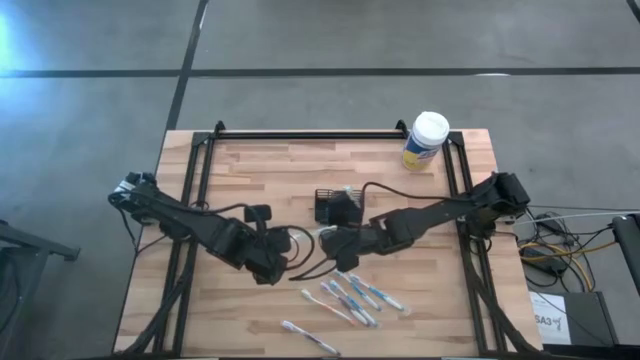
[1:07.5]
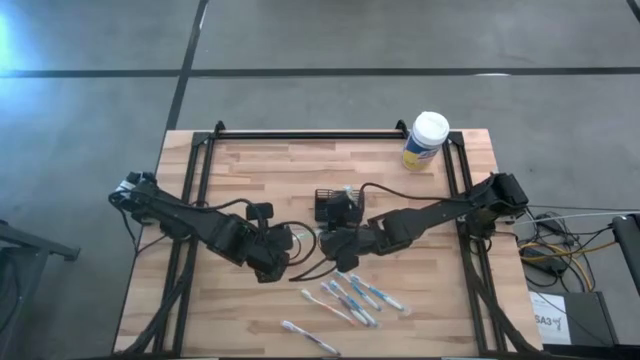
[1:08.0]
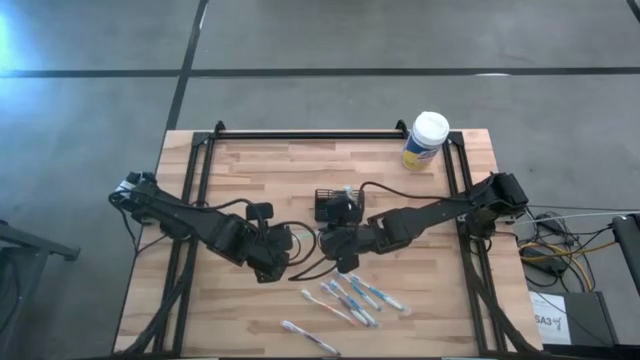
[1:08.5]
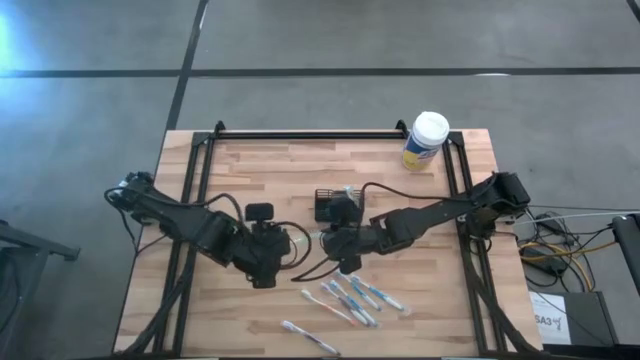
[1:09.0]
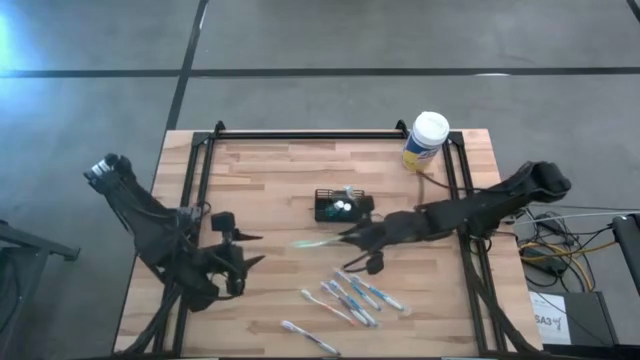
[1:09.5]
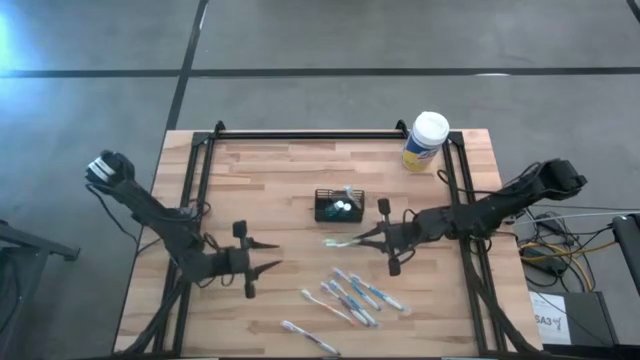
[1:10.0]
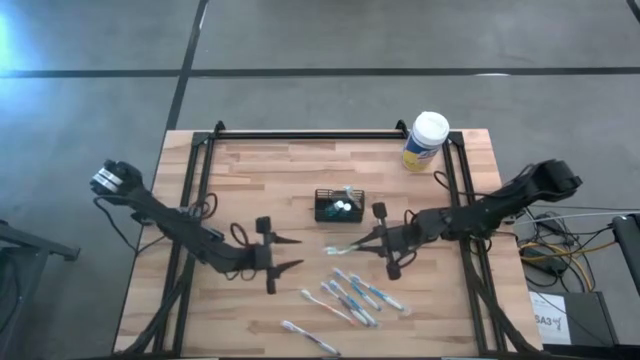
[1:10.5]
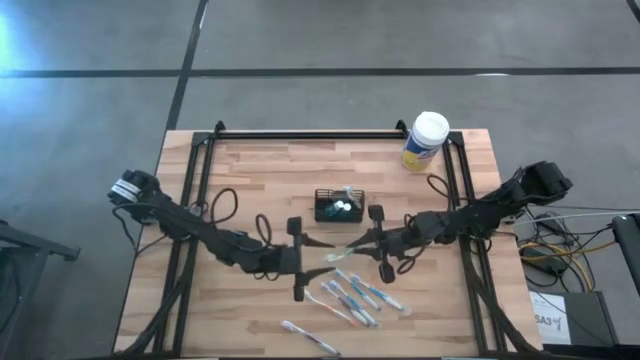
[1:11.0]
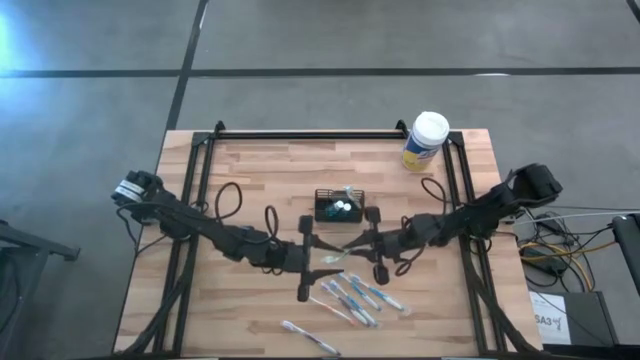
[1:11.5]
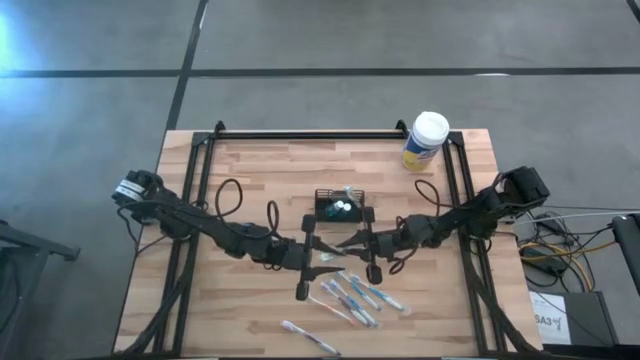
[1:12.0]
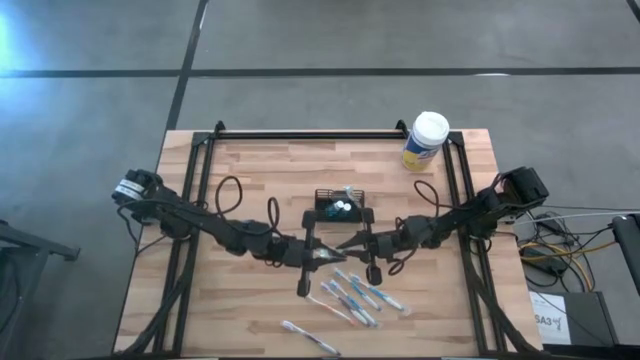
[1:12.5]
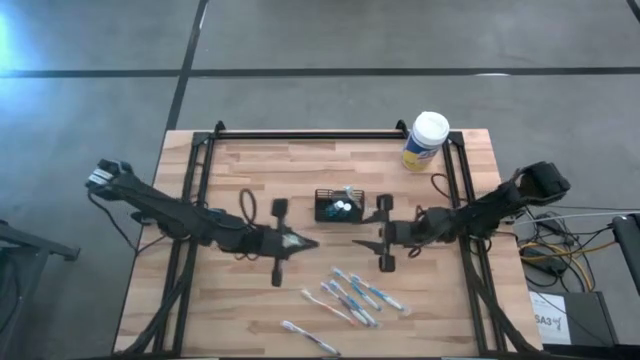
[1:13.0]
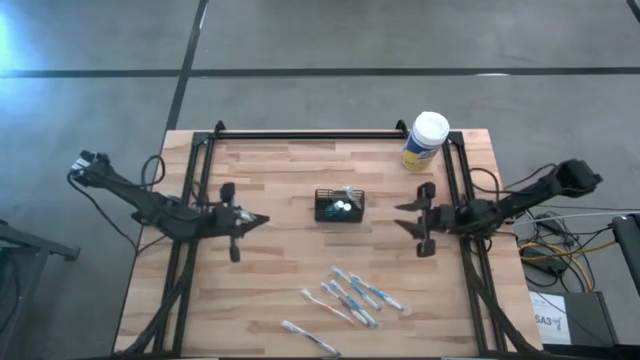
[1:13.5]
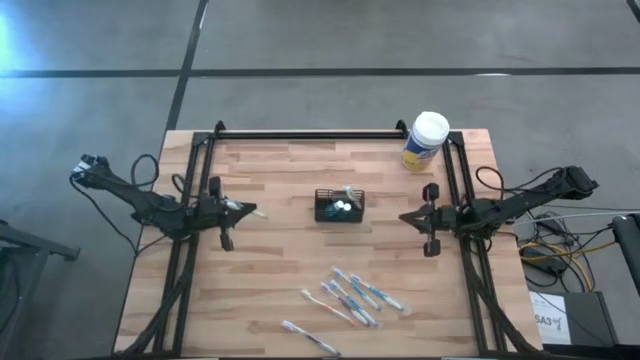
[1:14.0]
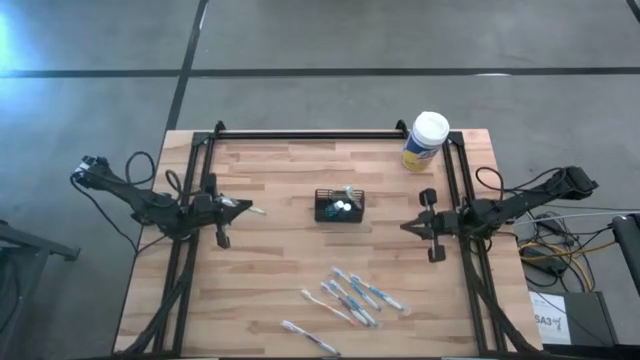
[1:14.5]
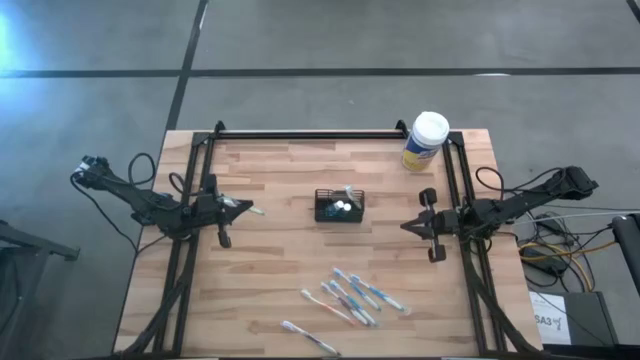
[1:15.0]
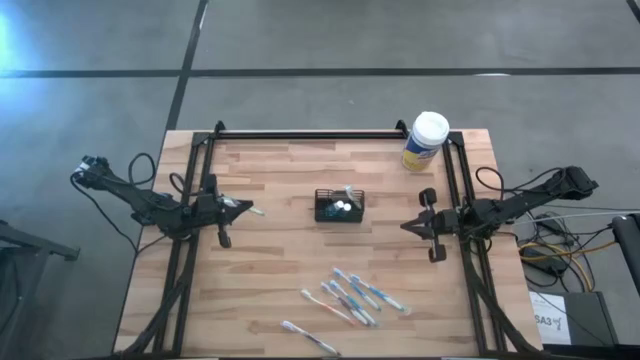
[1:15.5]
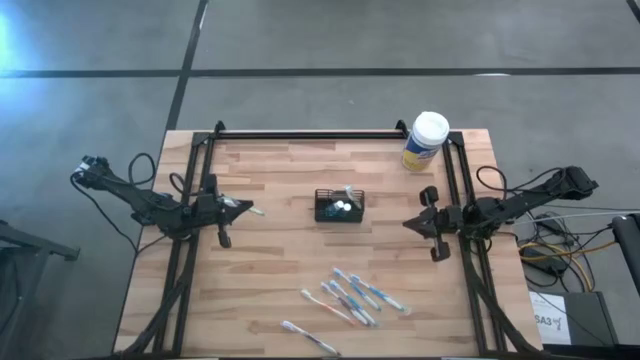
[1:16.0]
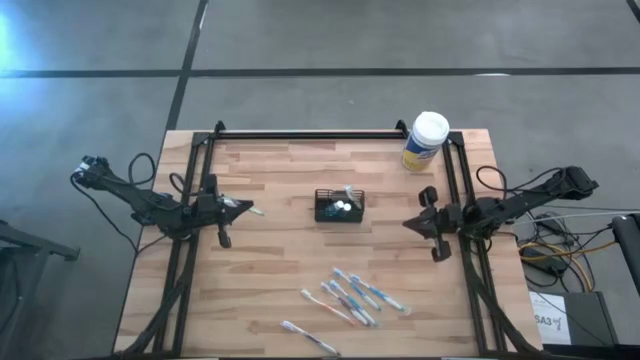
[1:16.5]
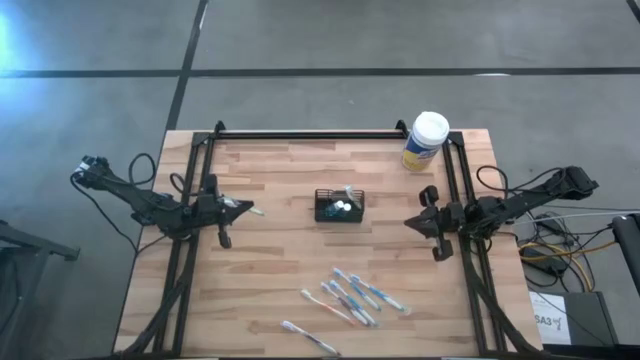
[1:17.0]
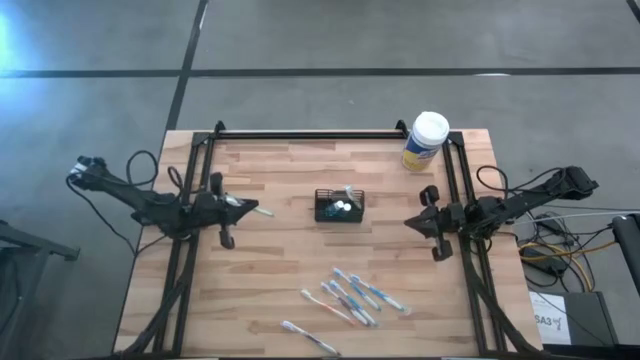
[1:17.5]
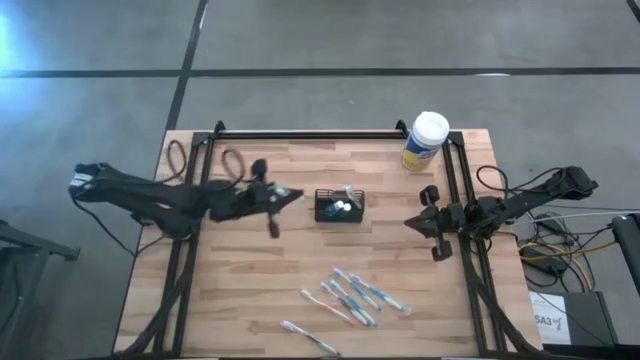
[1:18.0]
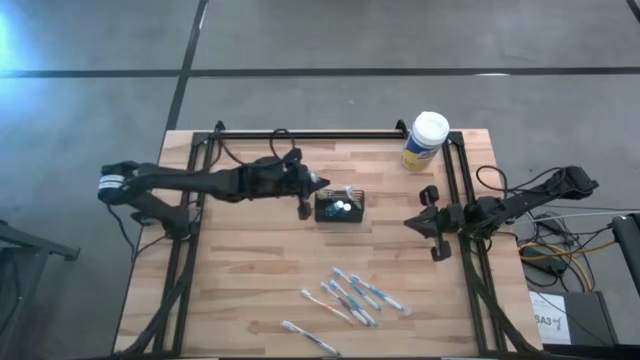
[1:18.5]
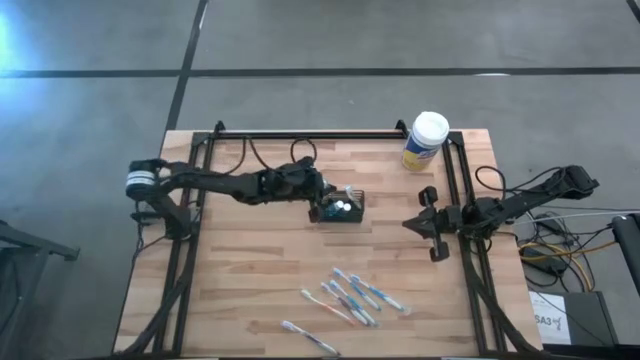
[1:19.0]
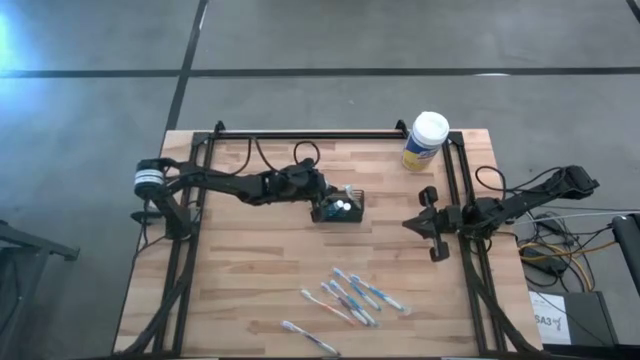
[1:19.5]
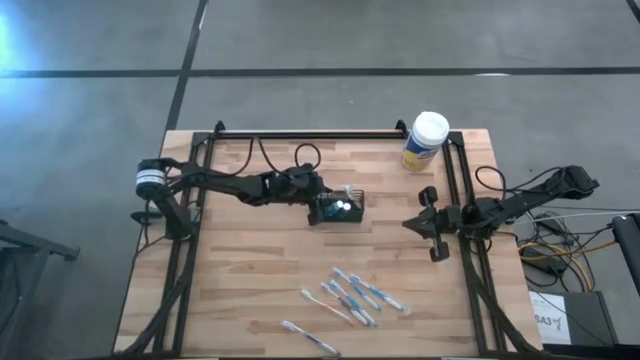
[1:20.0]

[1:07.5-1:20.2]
Task: Pick & Place toothbrushing station
Put the green toothbrush into the black wire organizer

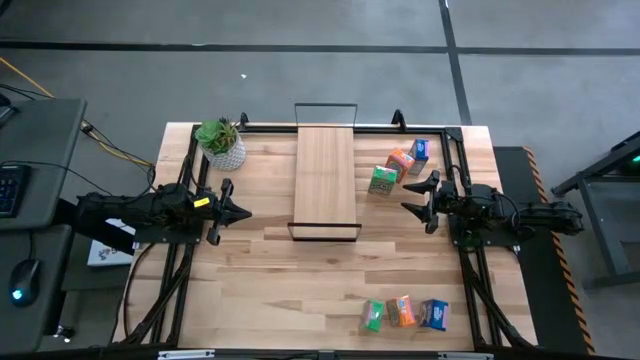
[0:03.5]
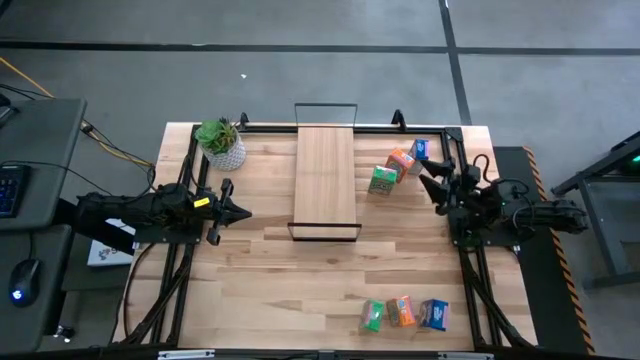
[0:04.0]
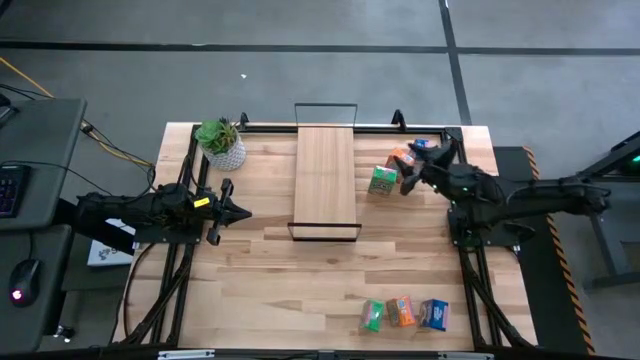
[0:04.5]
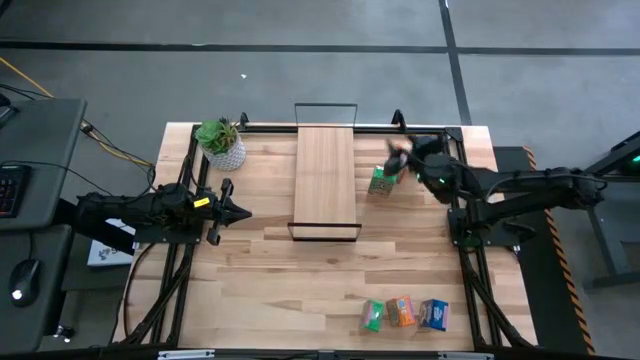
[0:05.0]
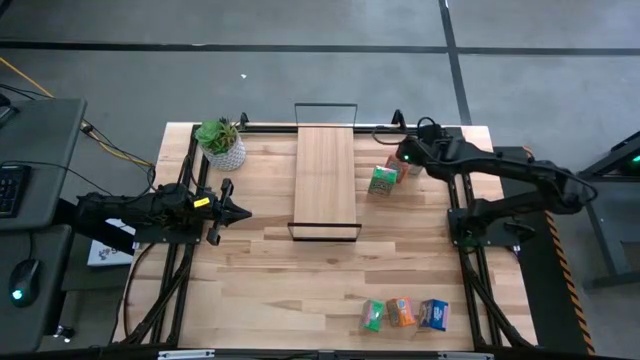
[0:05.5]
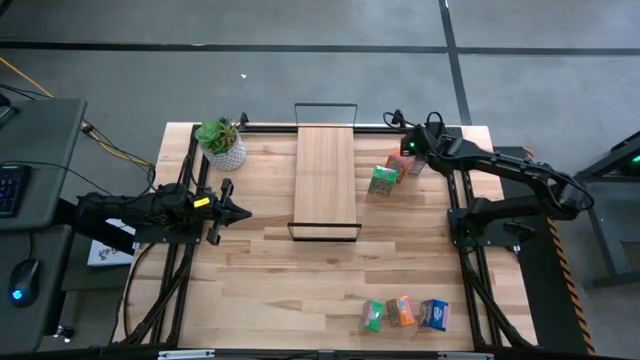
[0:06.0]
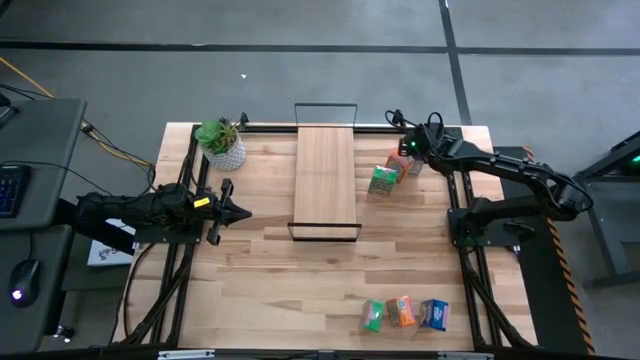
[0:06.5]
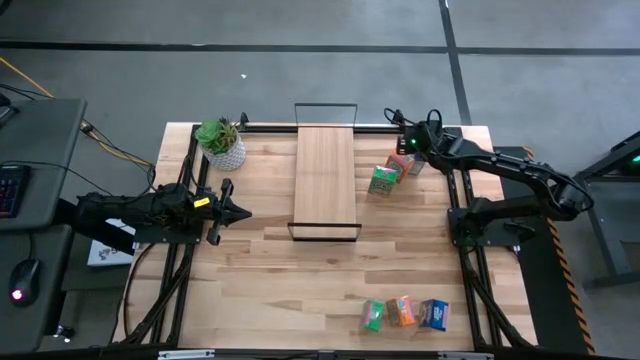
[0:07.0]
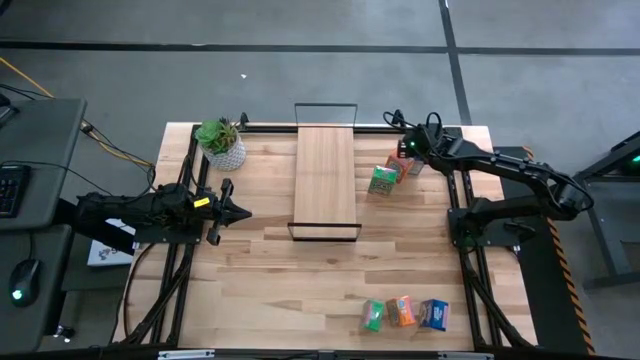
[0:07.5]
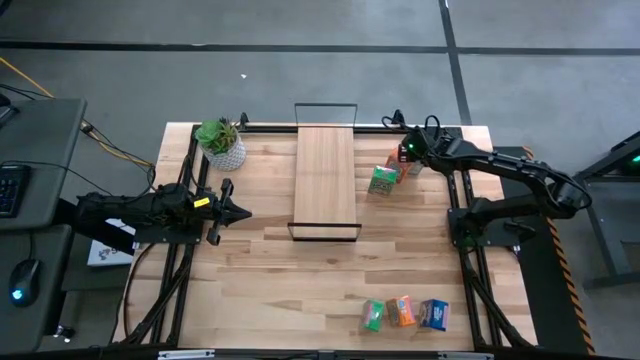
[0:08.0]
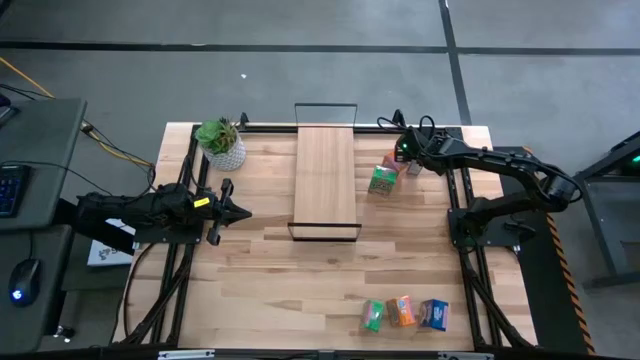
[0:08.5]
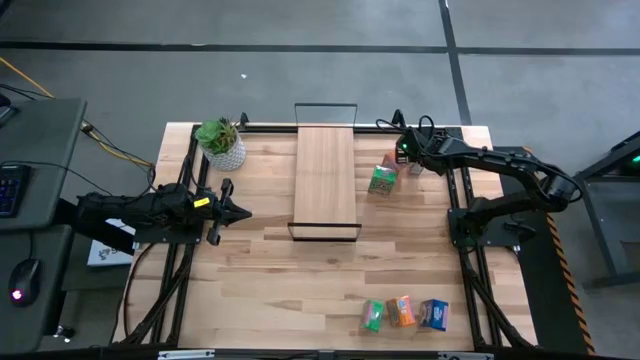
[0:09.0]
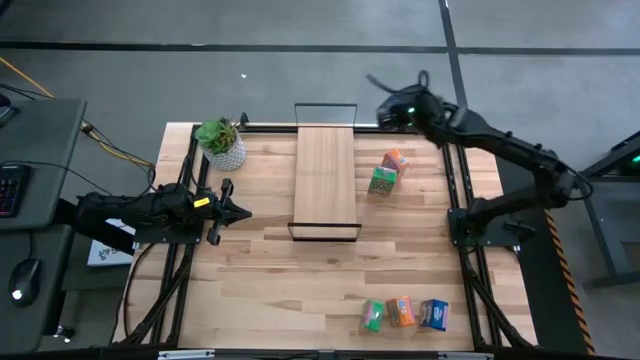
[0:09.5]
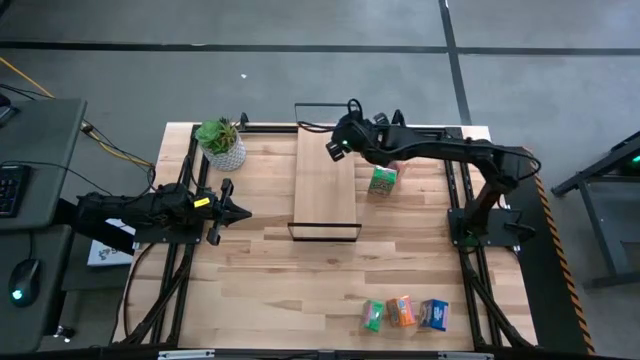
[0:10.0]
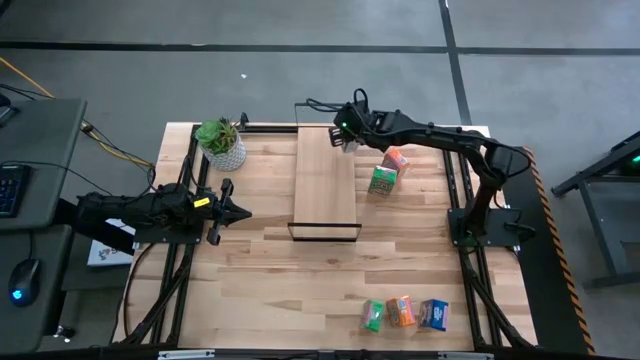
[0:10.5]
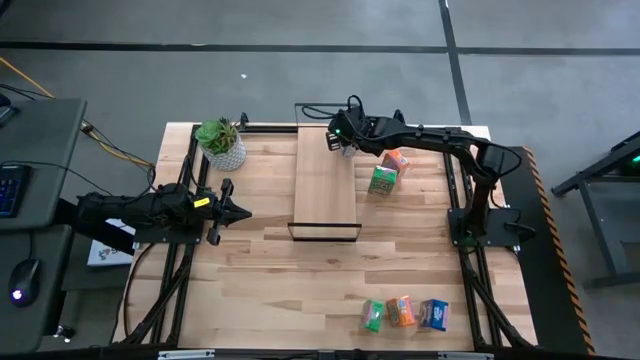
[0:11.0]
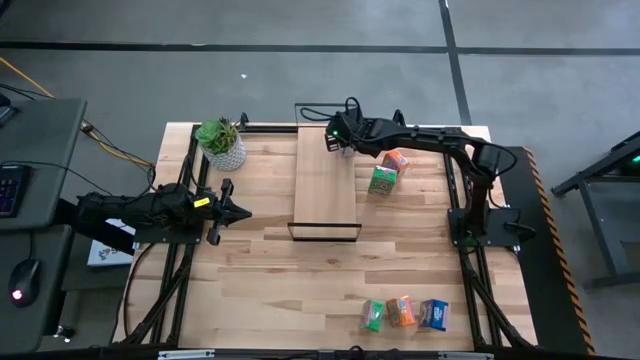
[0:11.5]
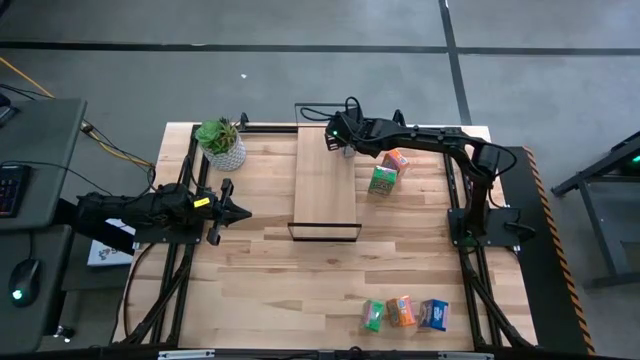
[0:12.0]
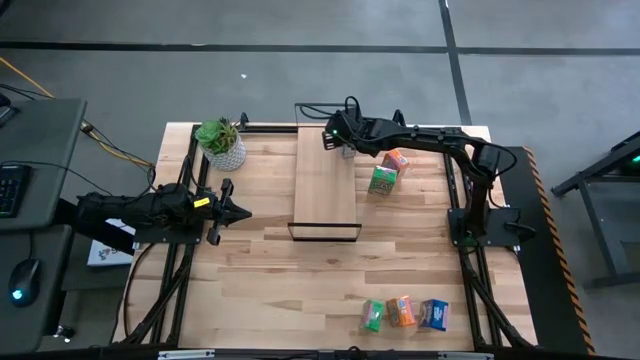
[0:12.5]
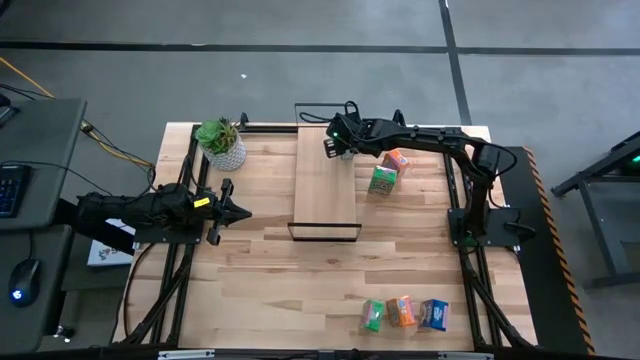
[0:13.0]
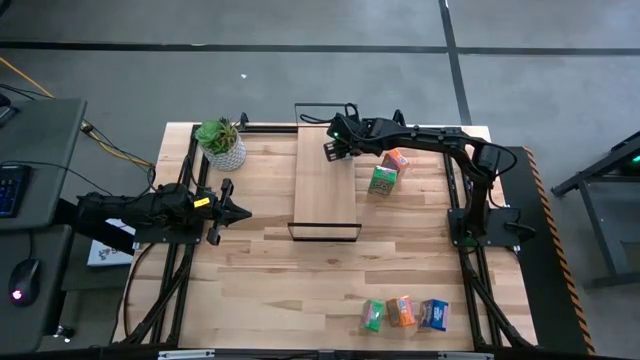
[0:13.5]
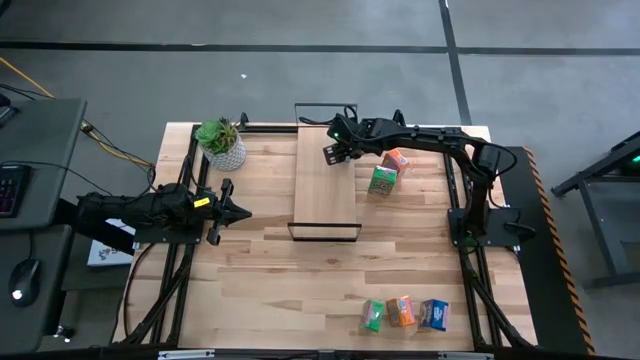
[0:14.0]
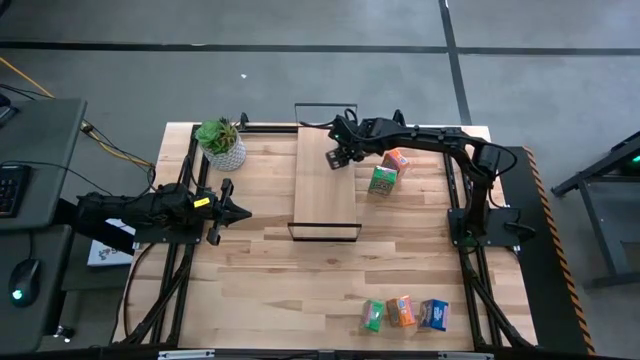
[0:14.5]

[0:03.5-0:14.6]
Task: Stack cereal on shelf
Put the top blue cereal box on the shelf
